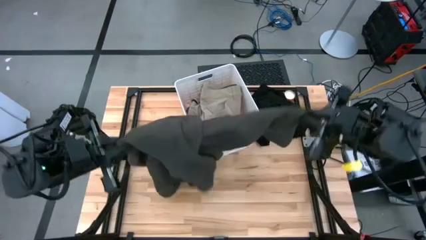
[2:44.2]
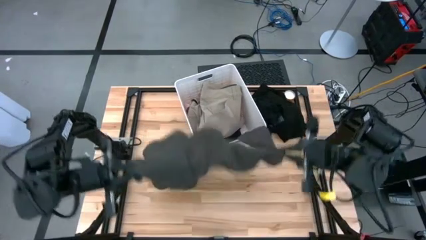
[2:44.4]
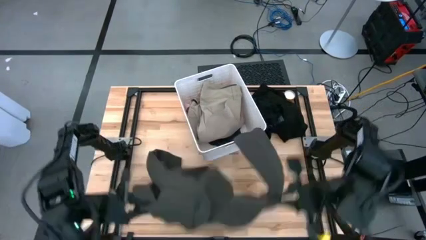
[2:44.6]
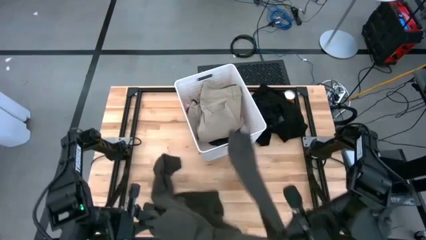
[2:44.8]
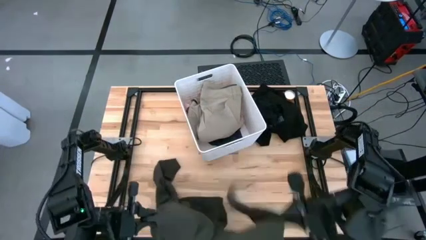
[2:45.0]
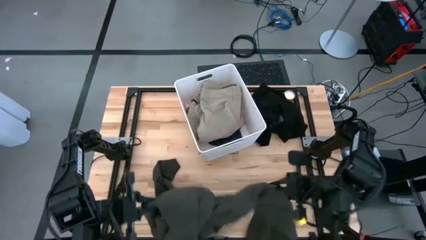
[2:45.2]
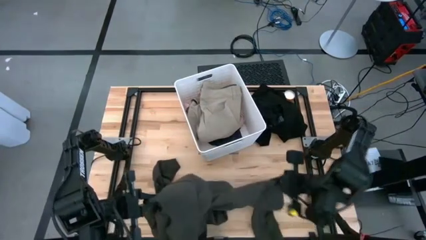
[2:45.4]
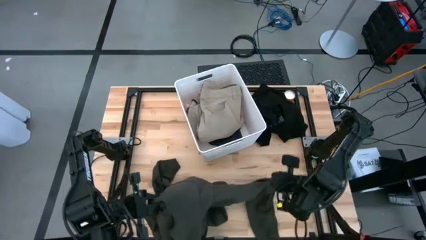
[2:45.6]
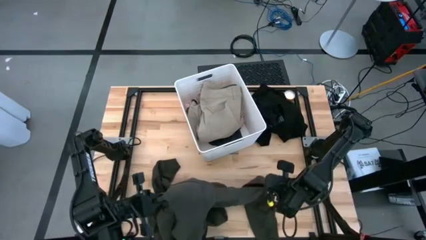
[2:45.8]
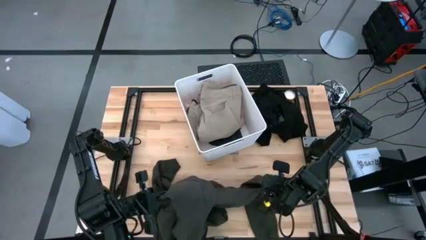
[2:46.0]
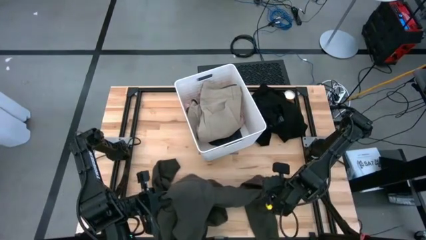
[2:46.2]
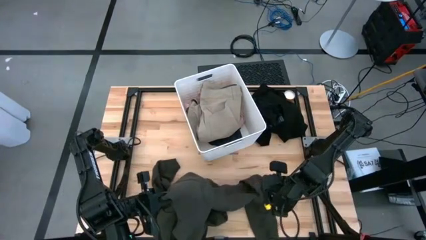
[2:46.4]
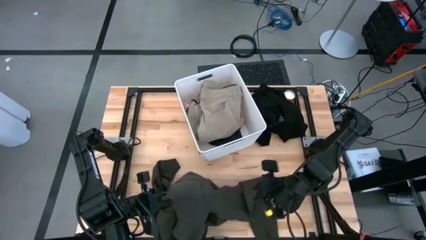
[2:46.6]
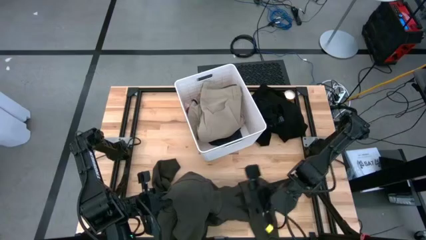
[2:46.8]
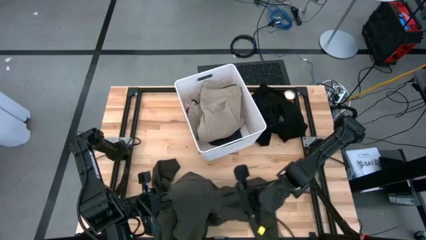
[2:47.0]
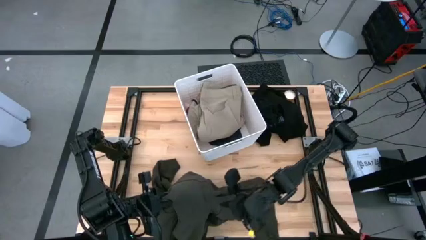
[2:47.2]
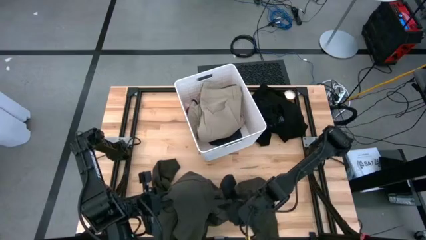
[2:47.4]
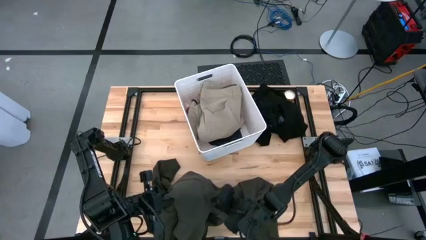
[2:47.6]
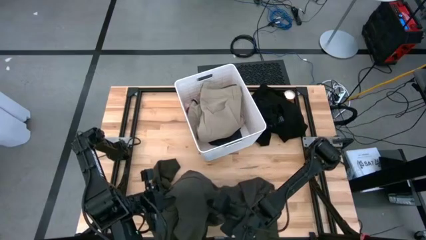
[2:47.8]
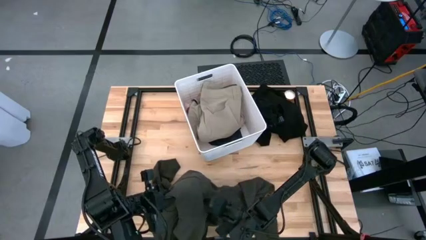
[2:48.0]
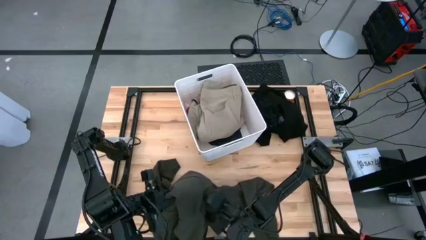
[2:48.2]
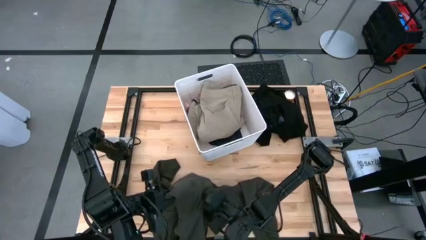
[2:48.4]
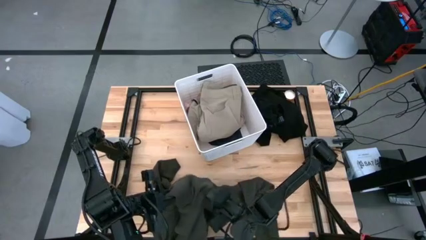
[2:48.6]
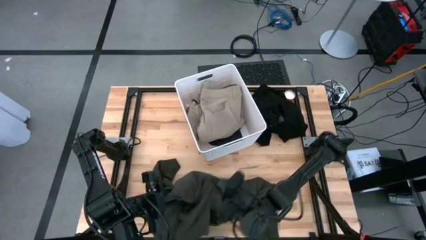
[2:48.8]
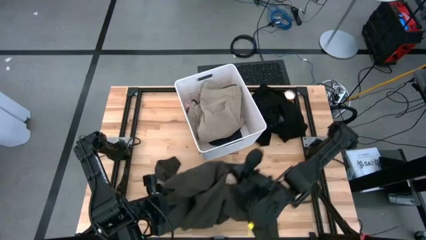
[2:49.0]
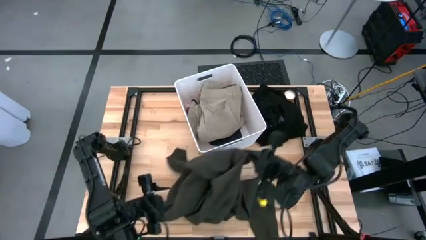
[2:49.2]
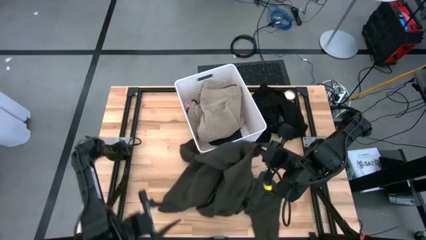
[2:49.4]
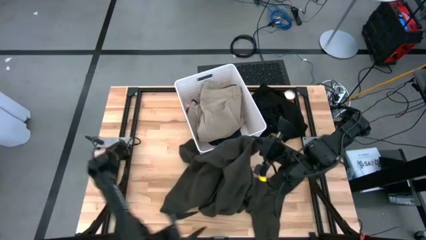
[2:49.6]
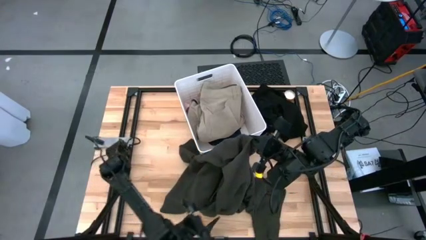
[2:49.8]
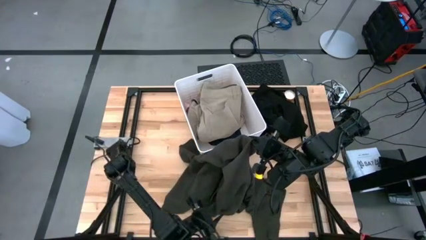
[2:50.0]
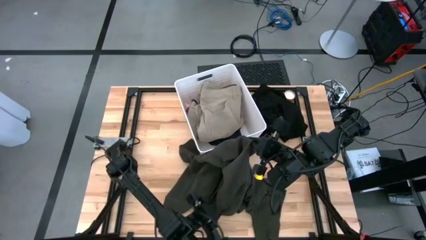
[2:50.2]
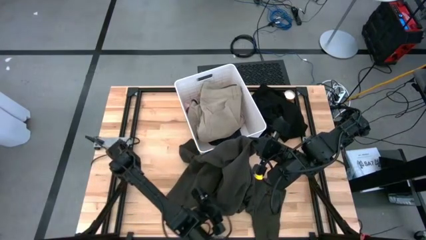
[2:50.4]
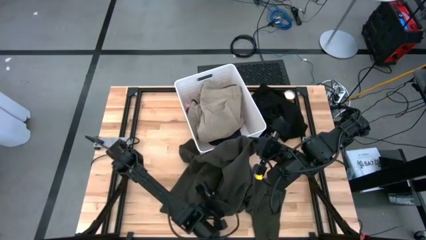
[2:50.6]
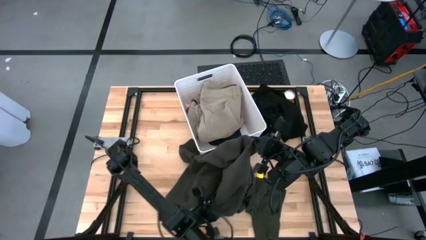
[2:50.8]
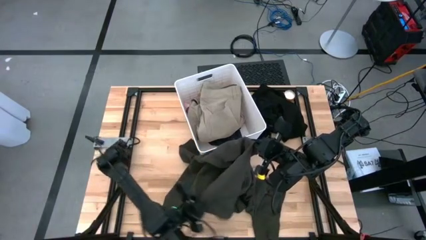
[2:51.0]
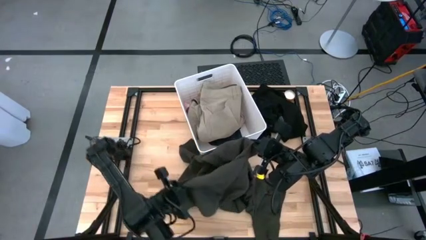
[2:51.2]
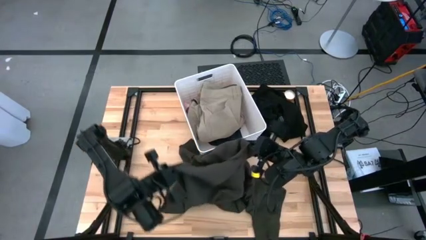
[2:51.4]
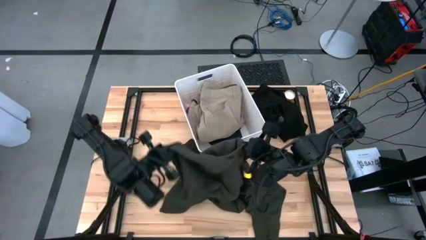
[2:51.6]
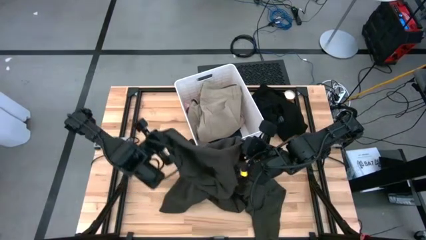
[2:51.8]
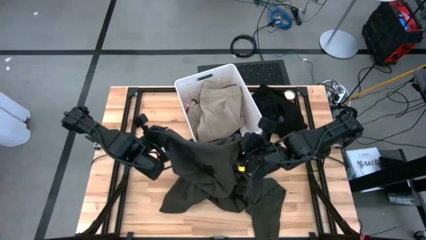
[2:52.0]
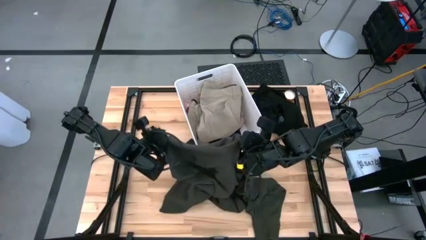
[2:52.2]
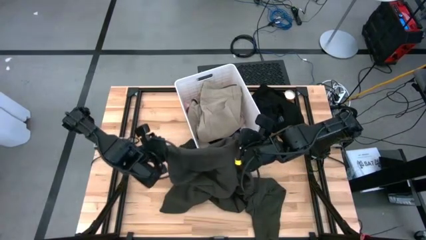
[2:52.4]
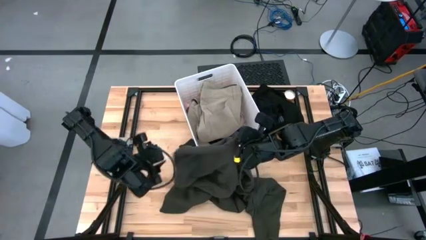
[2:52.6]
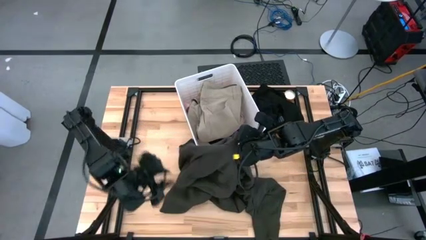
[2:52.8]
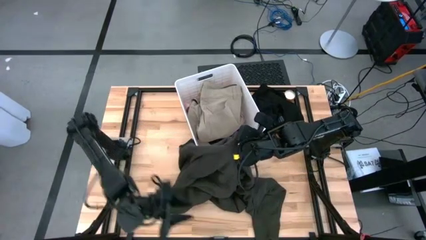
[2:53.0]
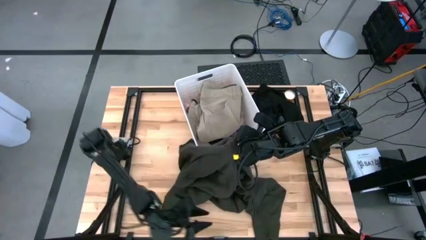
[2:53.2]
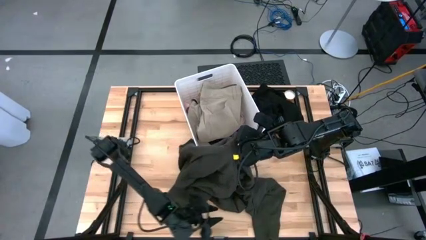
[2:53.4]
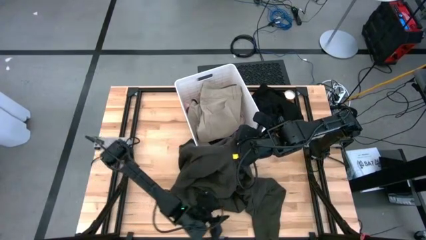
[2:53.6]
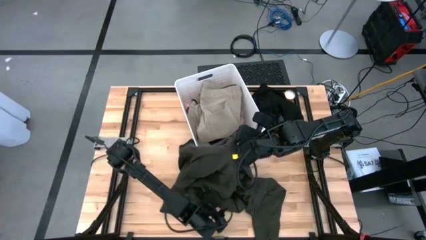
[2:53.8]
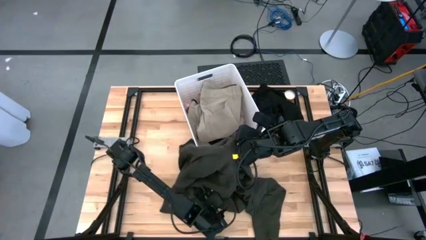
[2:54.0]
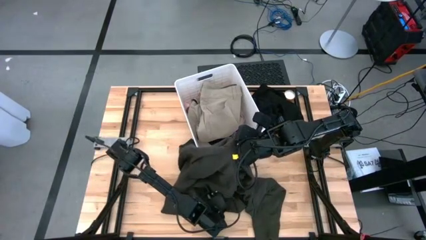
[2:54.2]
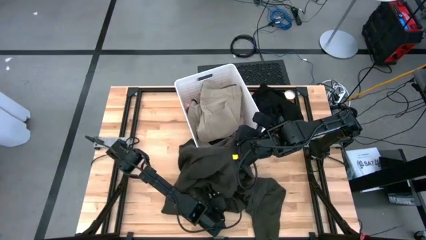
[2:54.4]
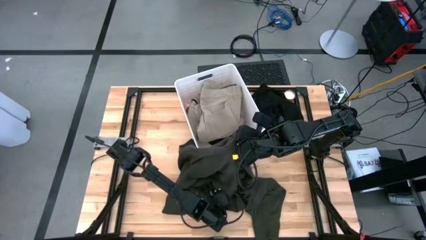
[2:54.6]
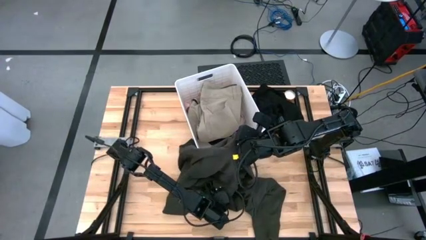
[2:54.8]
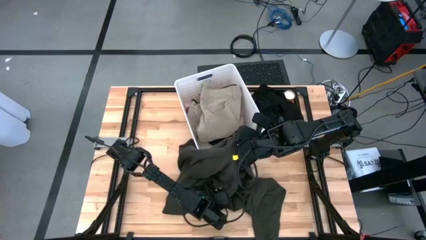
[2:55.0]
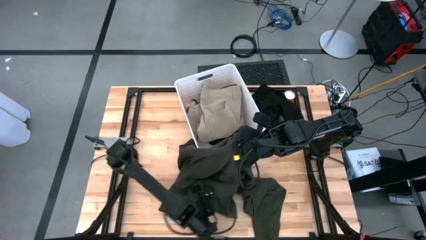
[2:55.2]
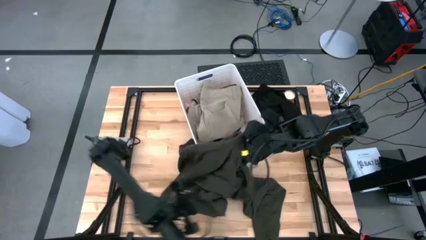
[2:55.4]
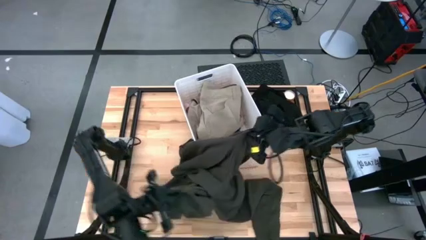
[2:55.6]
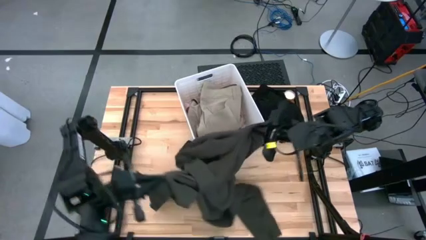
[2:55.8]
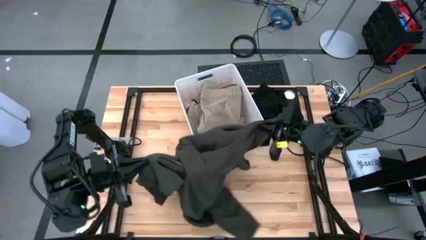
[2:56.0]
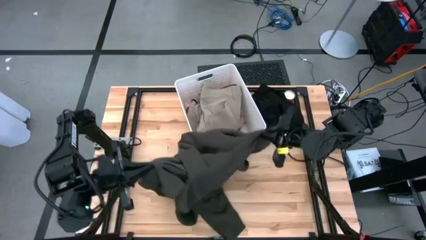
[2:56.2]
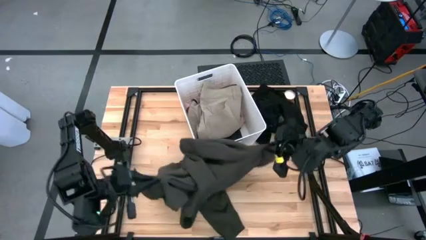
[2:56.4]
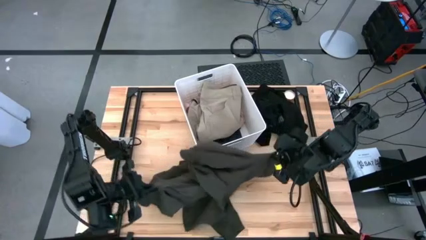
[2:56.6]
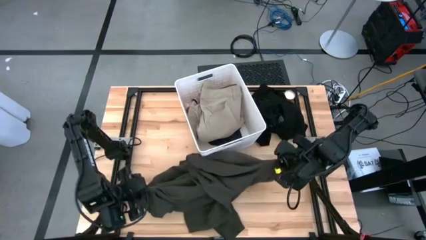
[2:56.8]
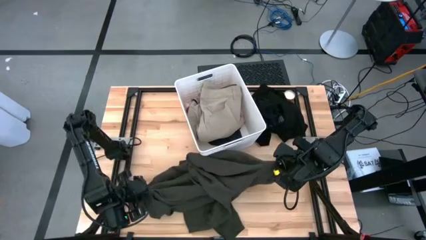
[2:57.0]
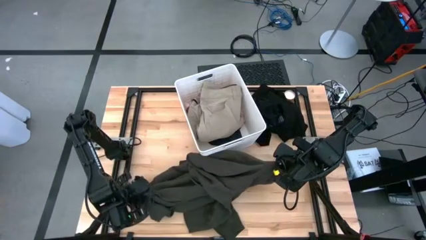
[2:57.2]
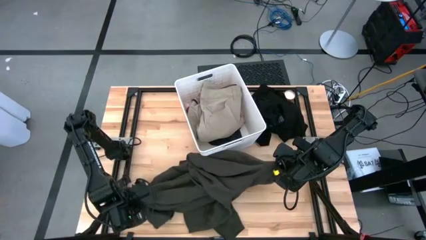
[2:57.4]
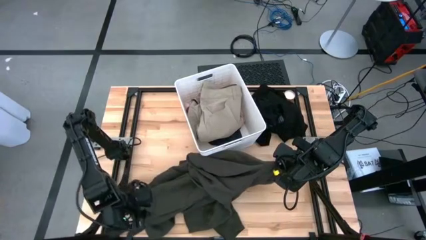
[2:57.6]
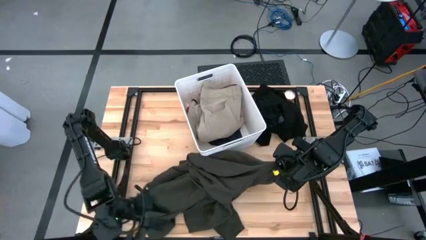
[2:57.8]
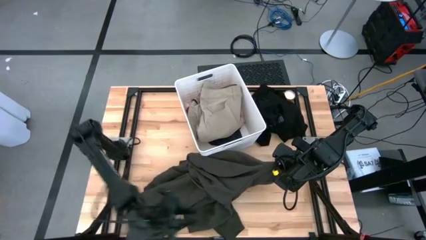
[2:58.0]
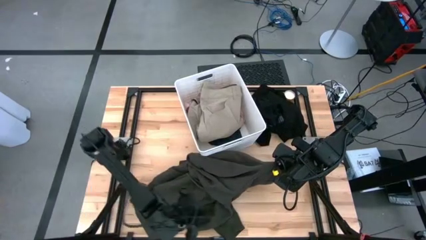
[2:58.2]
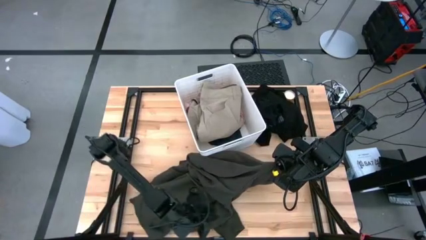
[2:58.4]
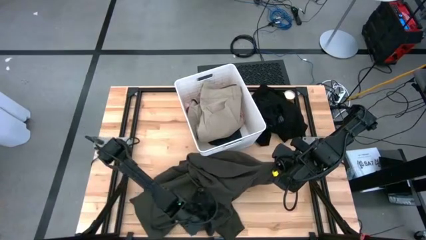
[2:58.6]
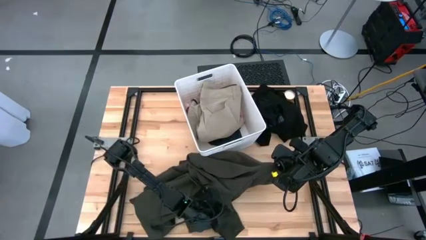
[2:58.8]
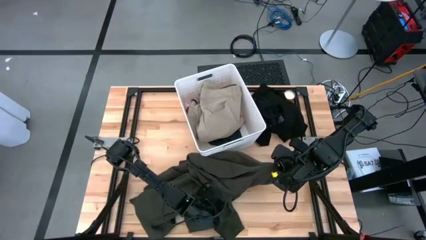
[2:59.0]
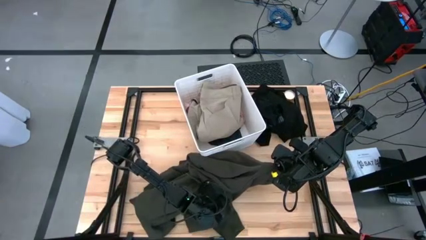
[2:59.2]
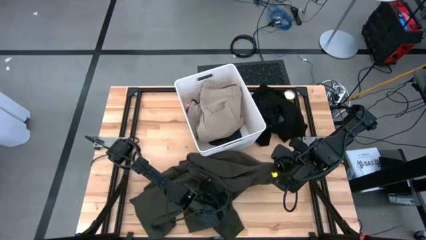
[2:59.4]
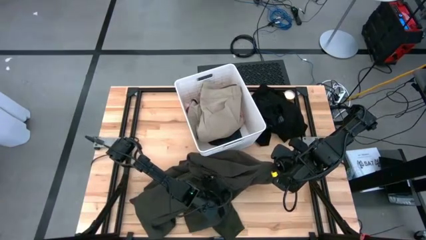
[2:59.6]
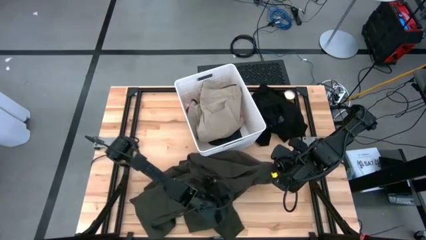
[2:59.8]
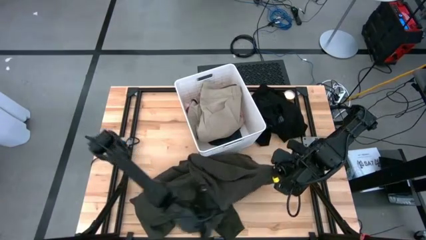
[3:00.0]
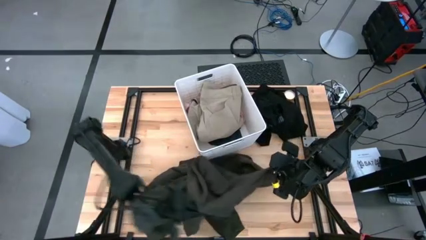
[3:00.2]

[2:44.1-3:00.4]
Task: Sort clothes
Put the folded gray jacket into the white laundry bin
